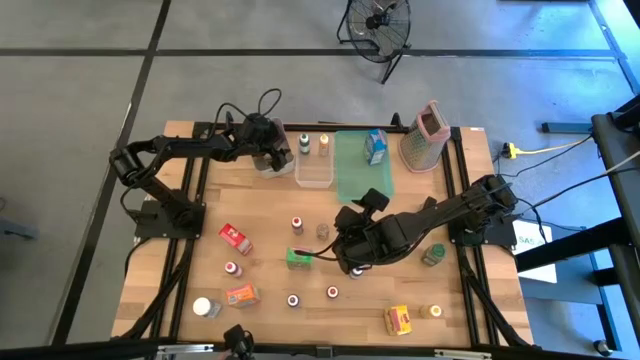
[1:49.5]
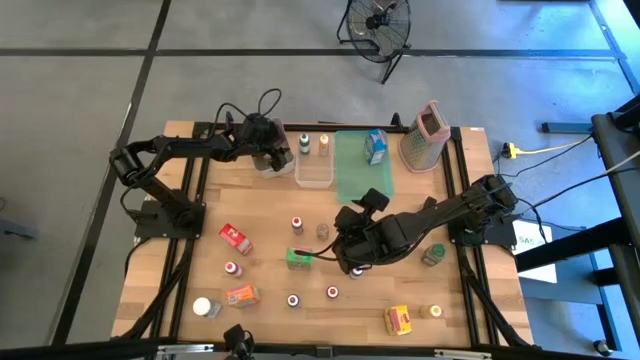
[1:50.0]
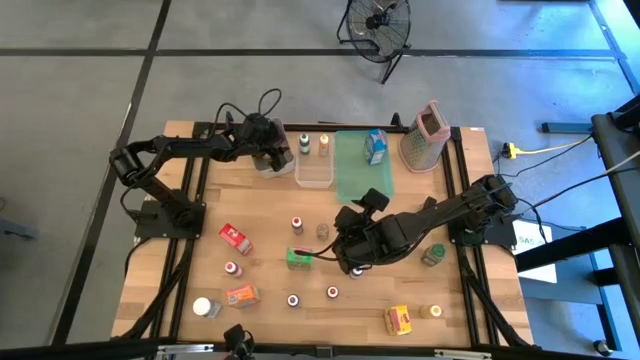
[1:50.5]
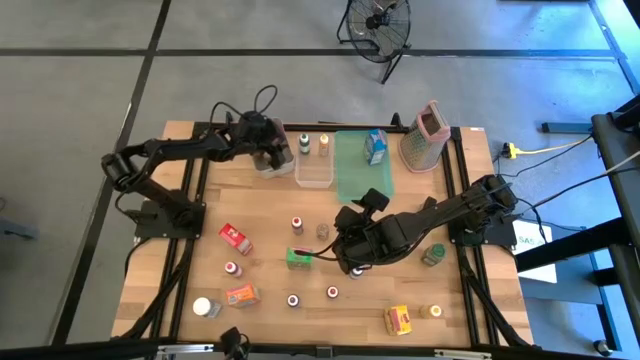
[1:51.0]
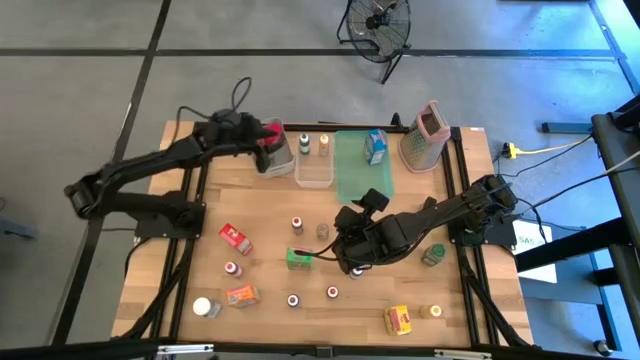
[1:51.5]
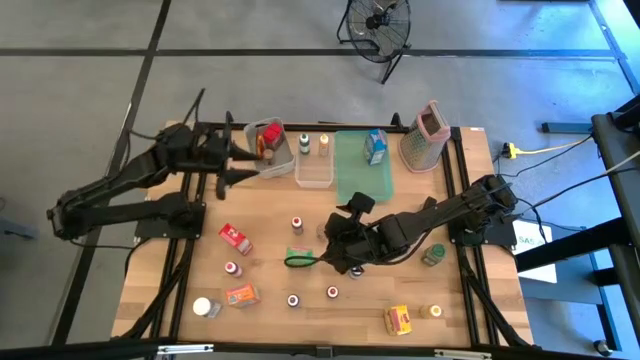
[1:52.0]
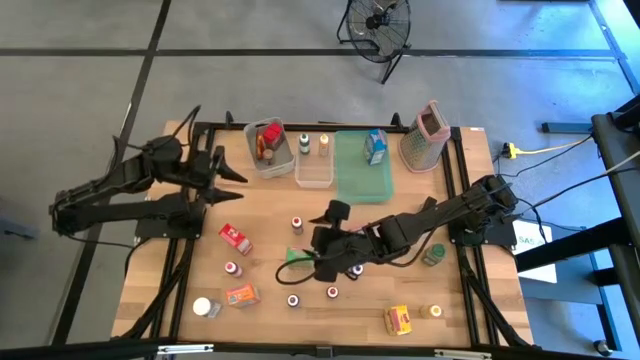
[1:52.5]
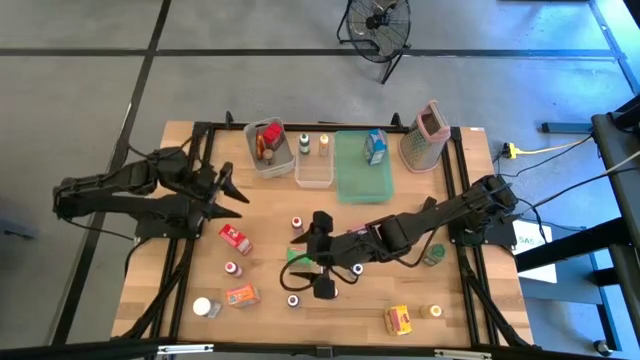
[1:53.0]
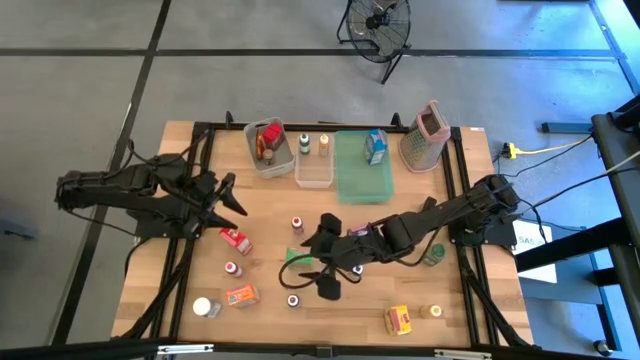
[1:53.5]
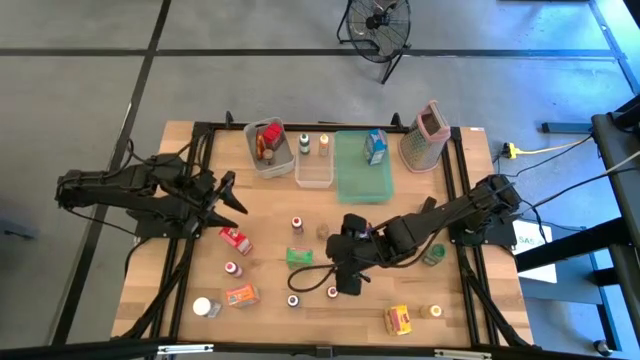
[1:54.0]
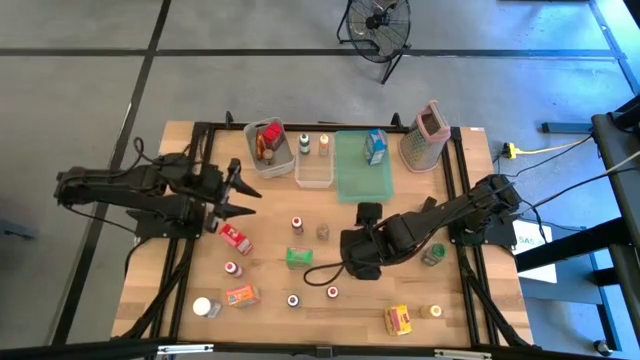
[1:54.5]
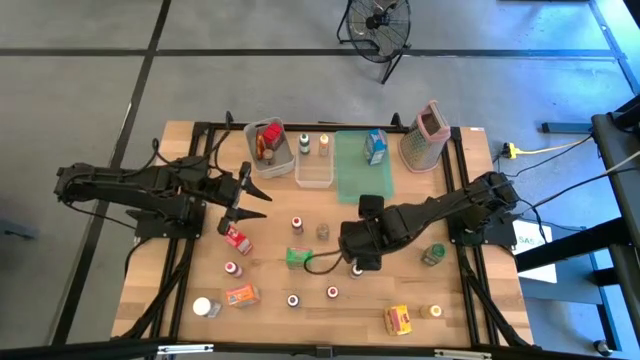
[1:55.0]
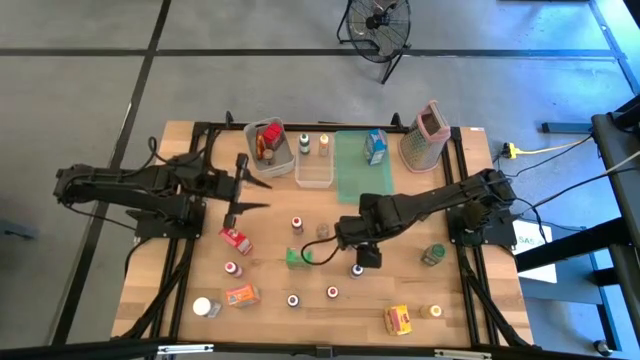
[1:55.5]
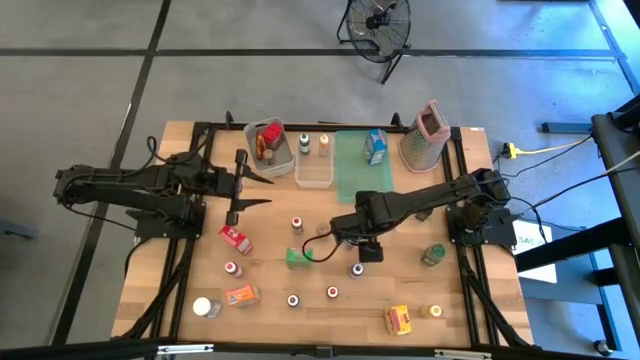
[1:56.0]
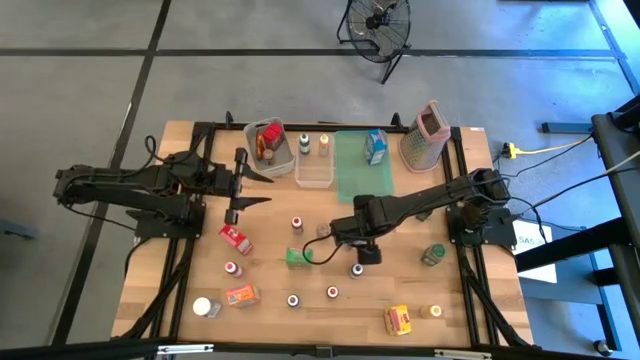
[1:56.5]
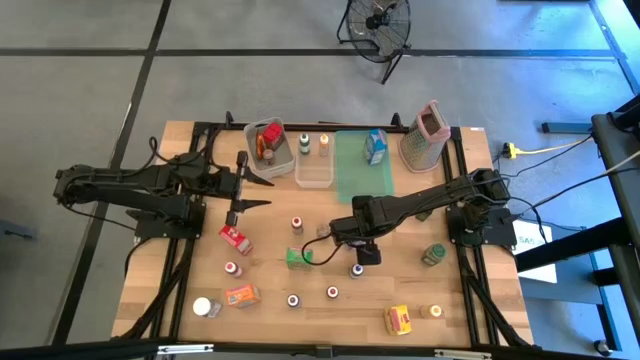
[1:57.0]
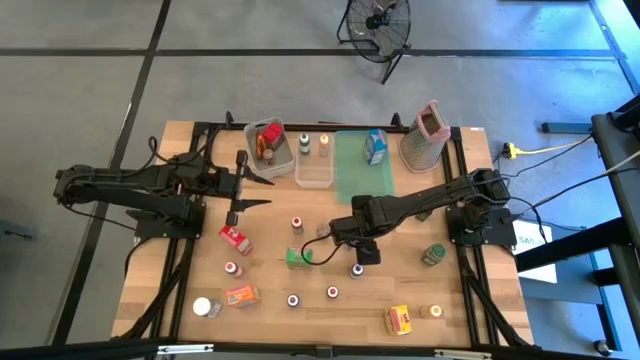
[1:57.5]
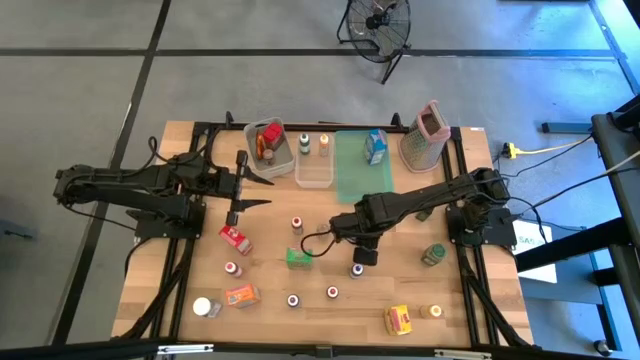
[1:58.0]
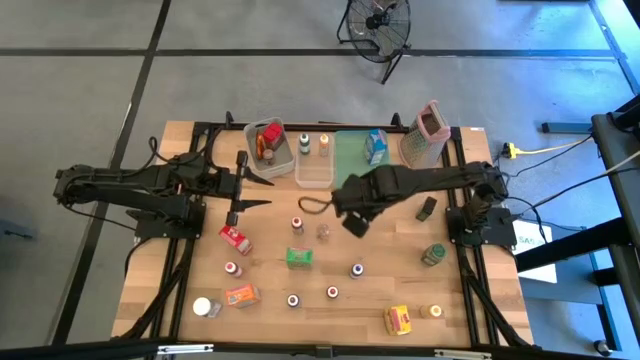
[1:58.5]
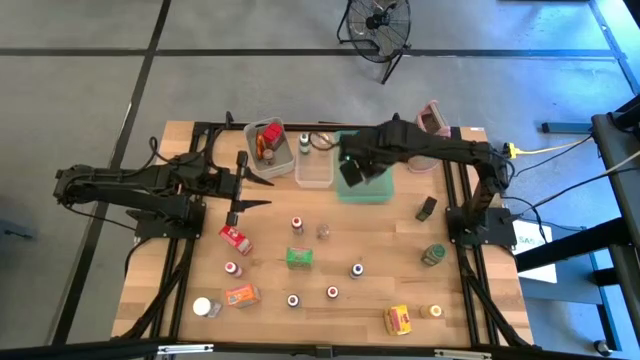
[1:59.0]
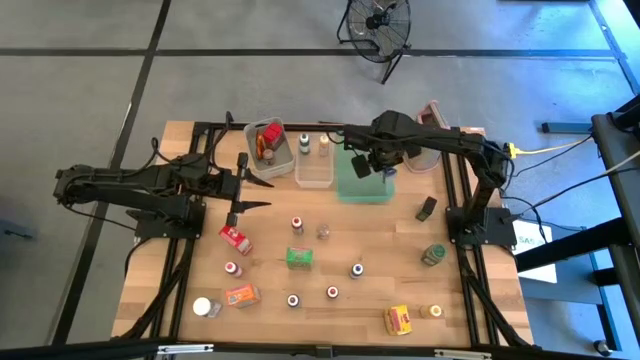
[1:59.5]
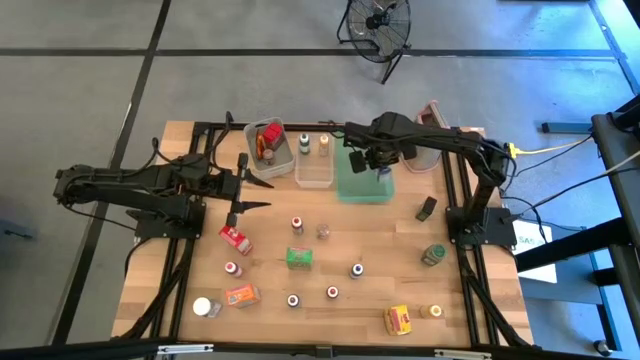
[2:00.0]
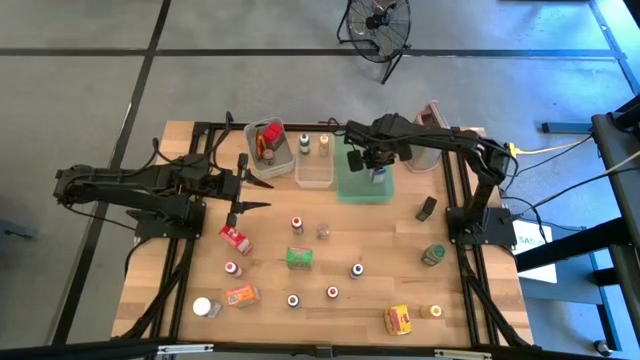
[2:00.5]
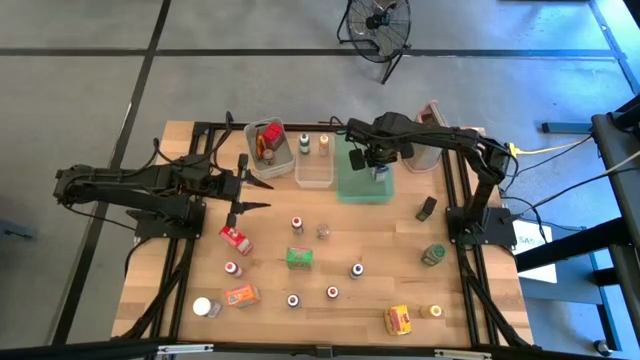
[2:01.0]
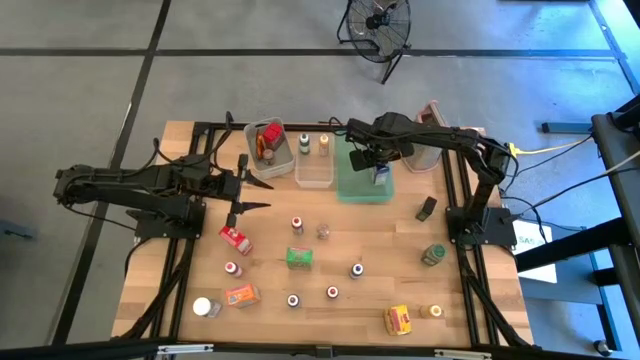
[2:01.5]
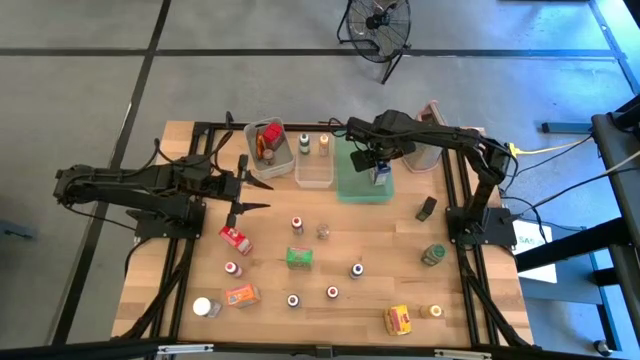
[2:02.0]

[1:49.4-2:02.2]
Task: Pick & Place Kitchen Items
Put the blue cereal box into the green bin

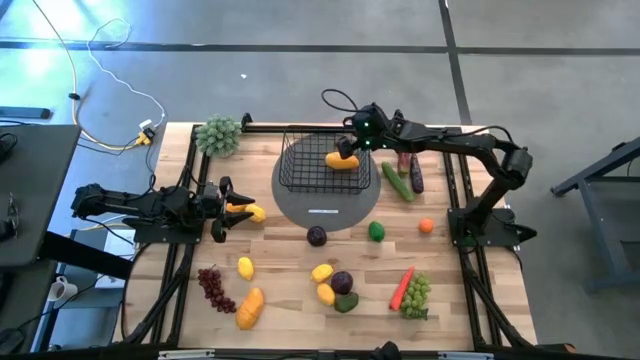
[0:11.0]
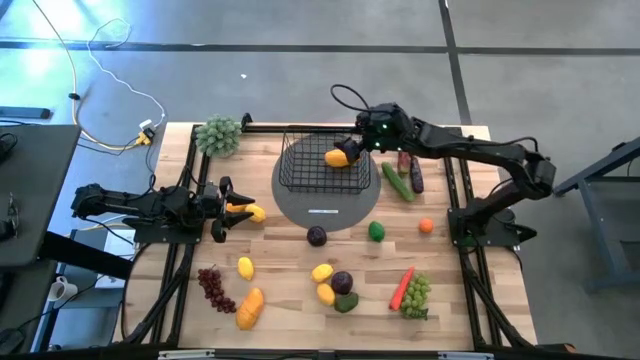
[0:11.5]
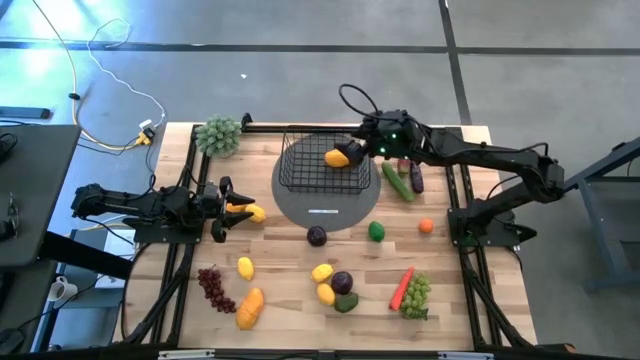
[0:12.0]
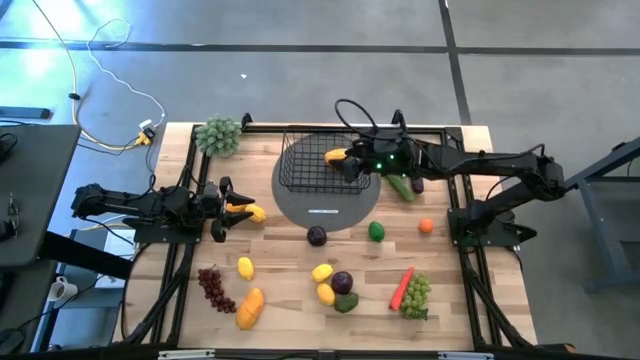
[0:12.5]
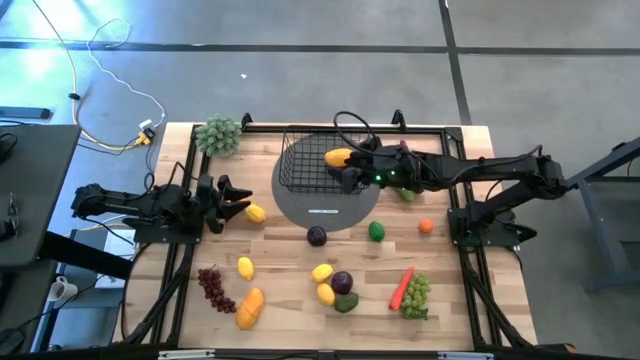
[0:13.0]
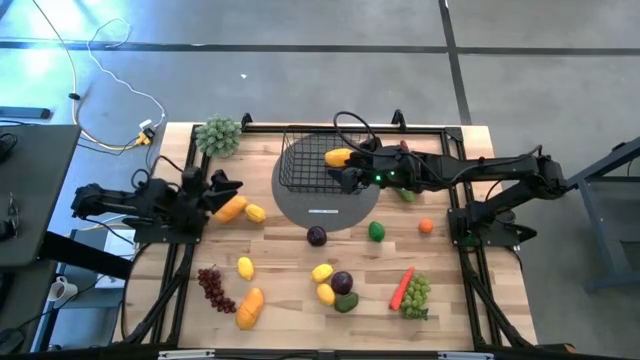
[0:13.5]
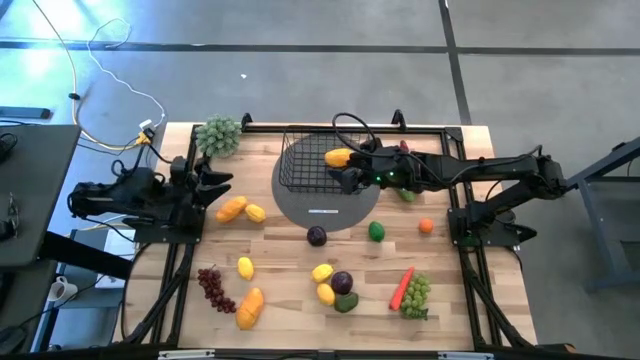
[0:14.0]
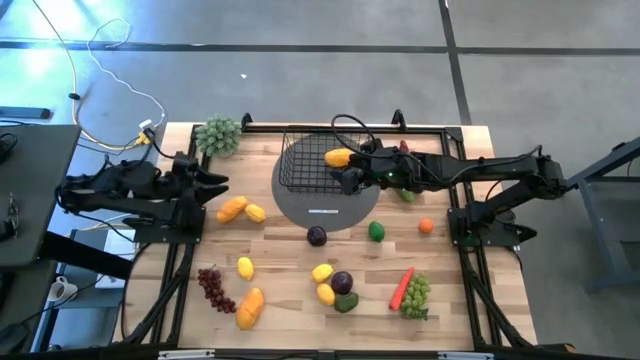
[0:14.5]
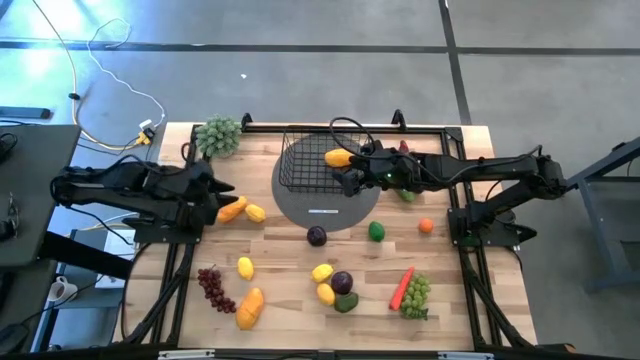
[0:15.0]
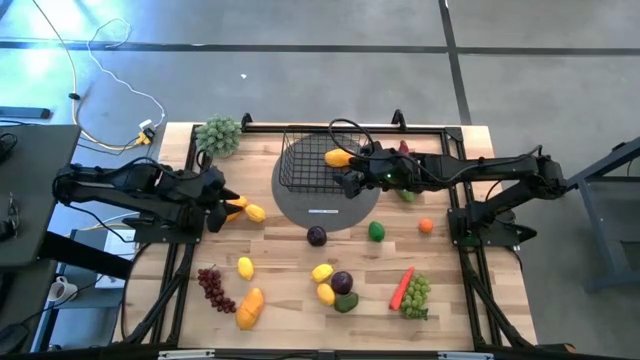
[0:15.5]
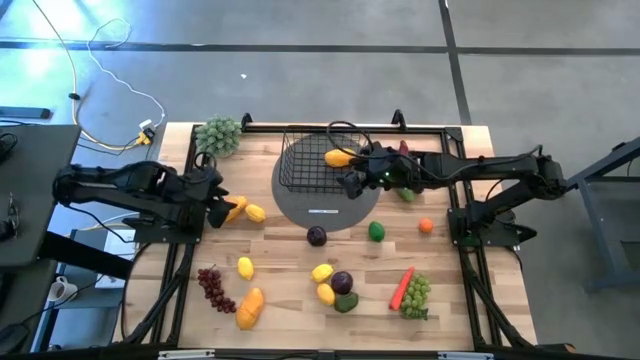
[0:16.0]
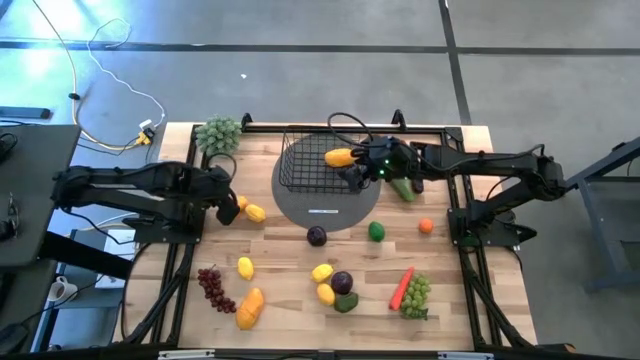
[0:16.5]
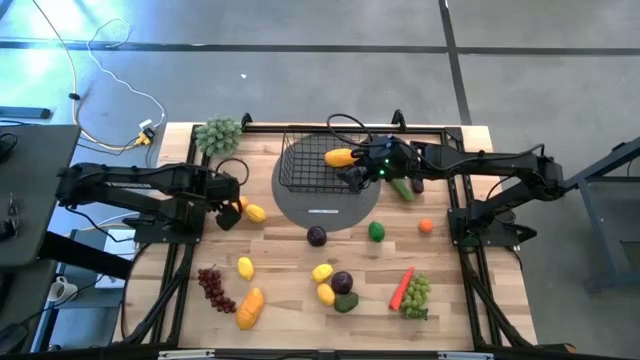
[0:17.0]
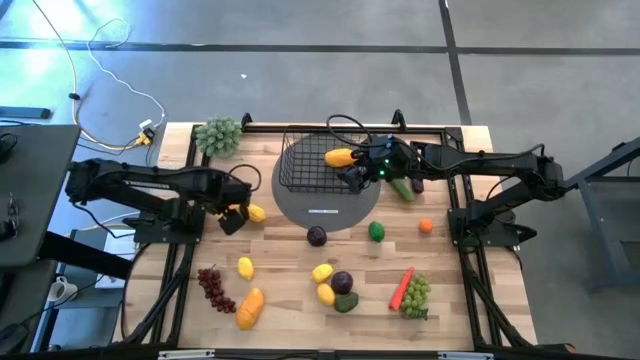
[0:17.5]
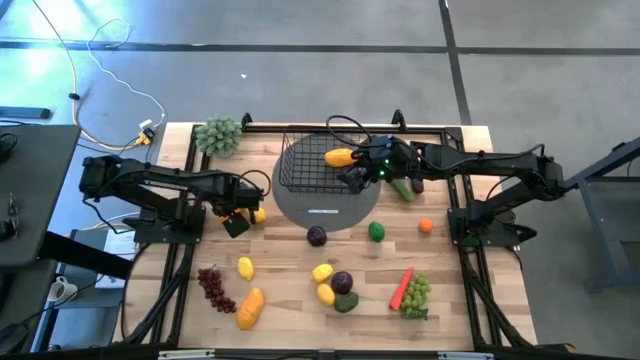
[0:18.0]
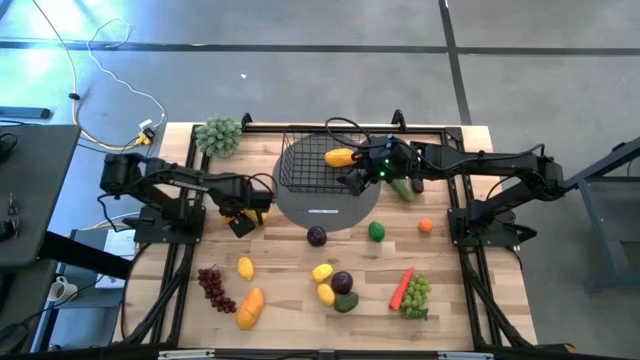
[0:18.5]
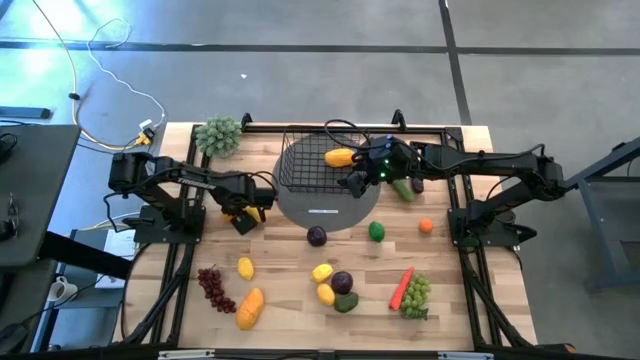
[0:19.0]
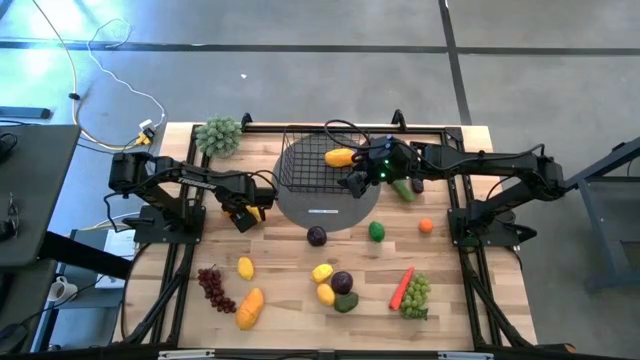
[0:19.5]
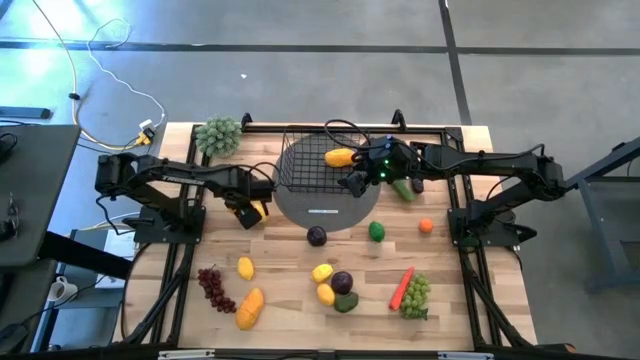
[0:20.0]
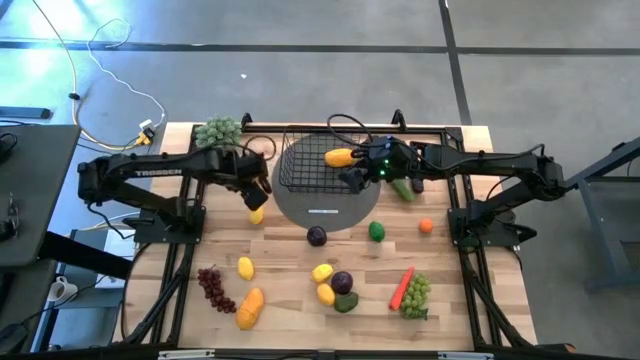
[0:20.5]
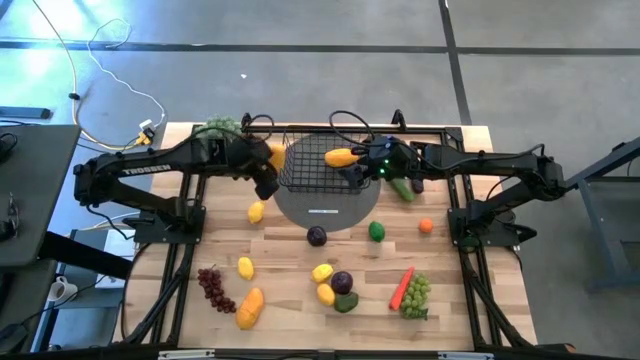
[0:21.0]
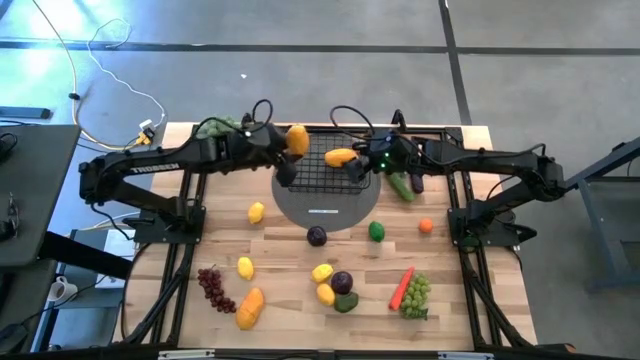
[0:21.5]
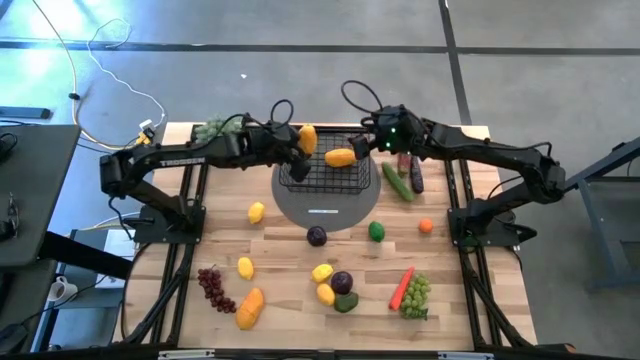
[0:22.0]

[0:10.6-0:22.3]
Task: Build produce basket
Put the yellow mango into the wire basket
